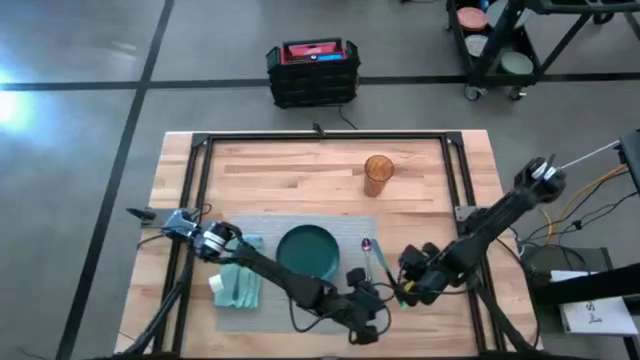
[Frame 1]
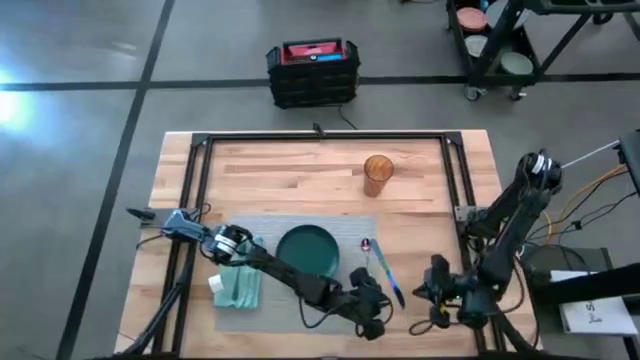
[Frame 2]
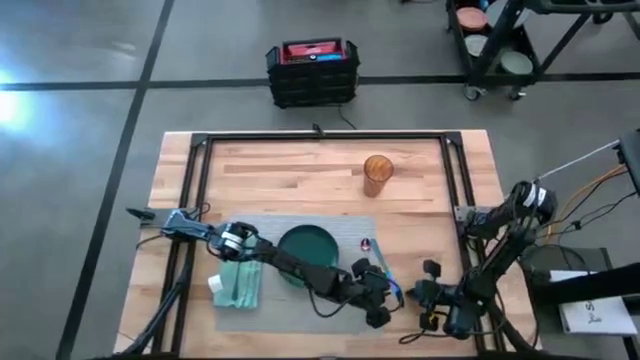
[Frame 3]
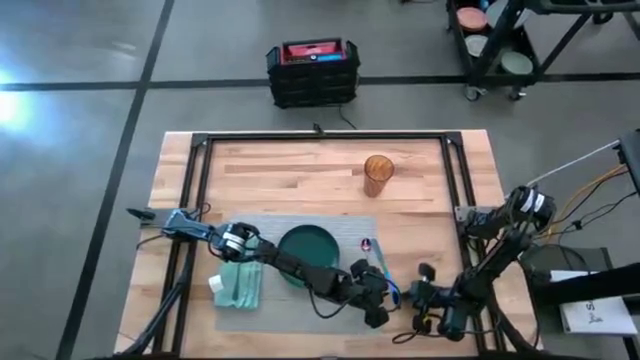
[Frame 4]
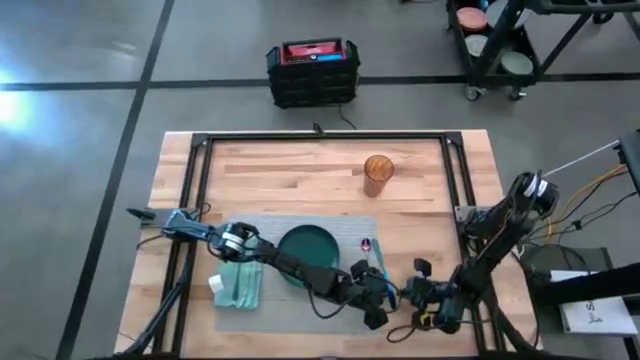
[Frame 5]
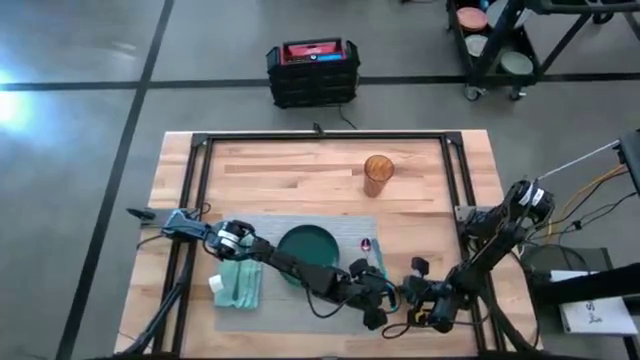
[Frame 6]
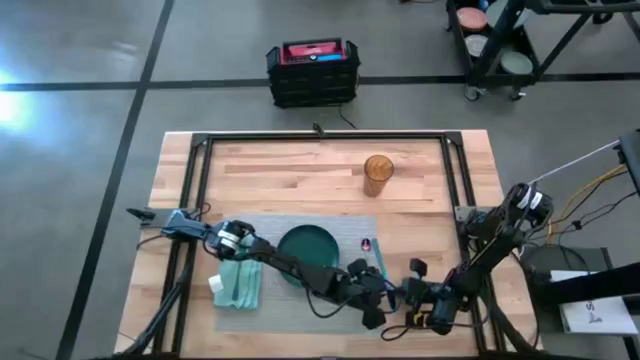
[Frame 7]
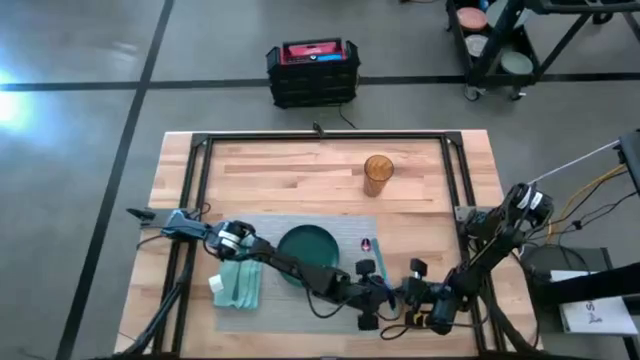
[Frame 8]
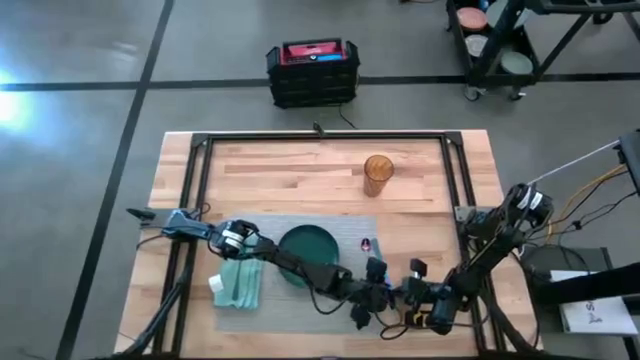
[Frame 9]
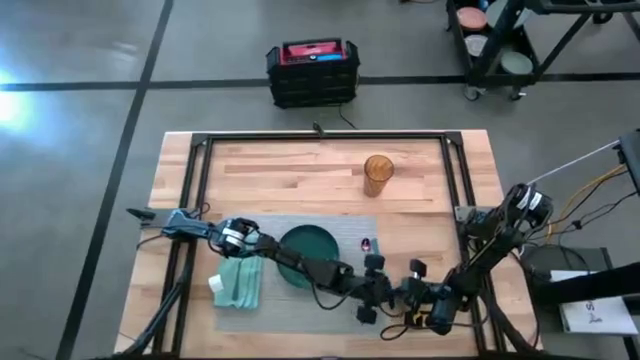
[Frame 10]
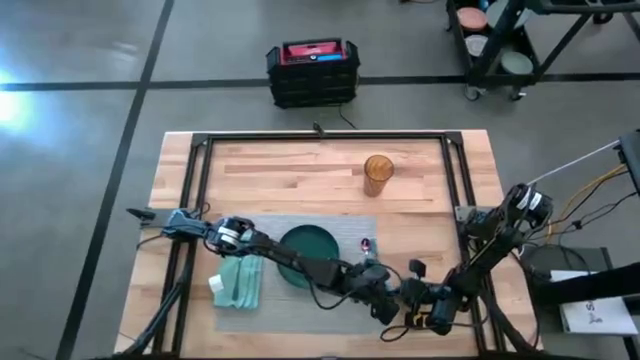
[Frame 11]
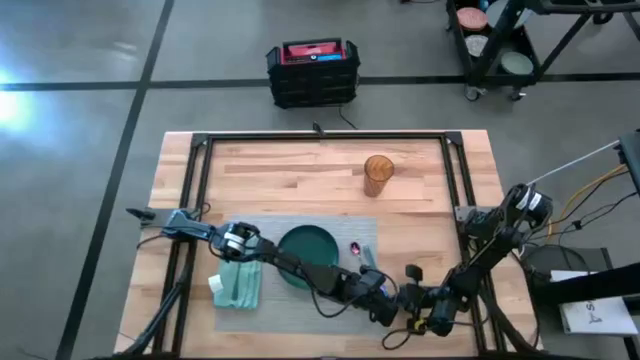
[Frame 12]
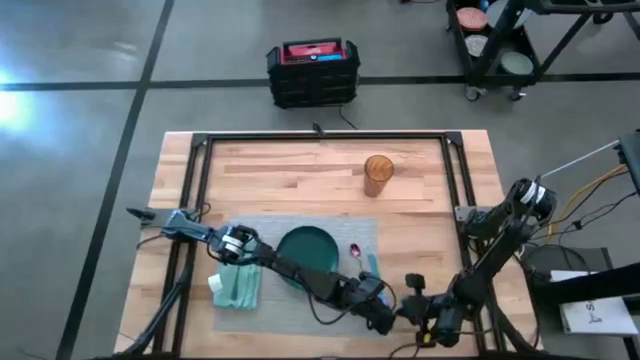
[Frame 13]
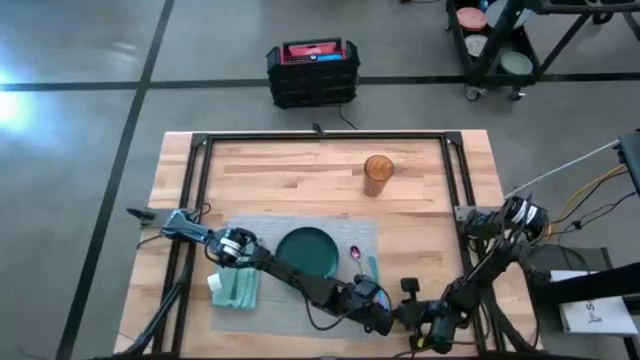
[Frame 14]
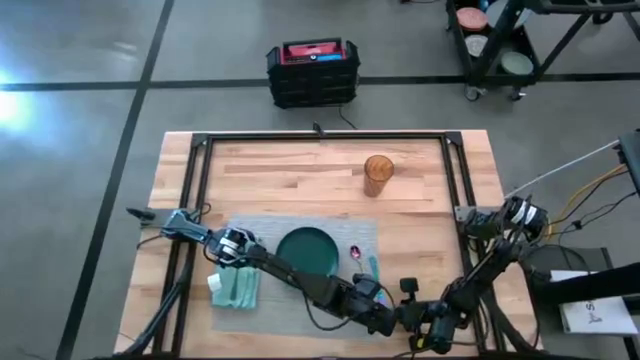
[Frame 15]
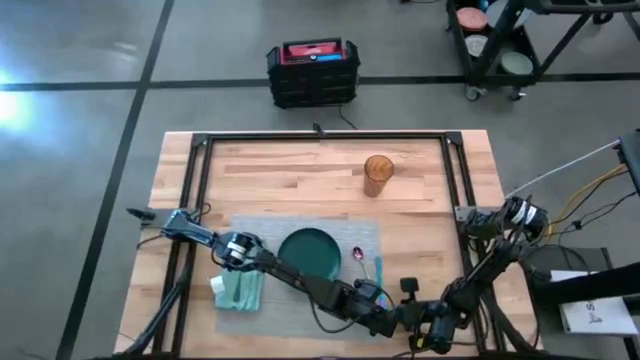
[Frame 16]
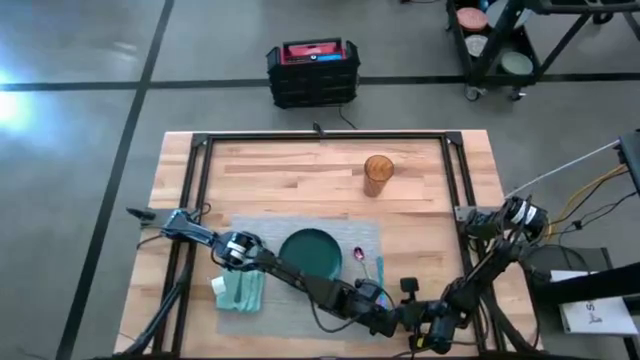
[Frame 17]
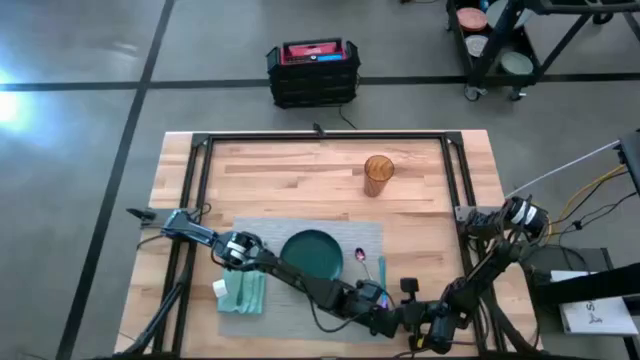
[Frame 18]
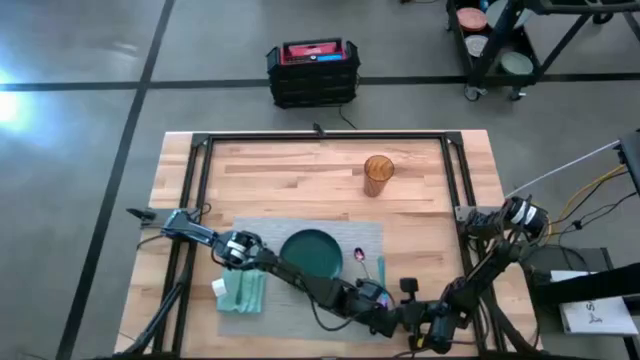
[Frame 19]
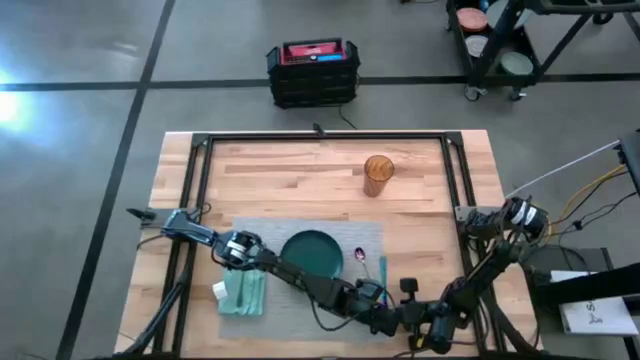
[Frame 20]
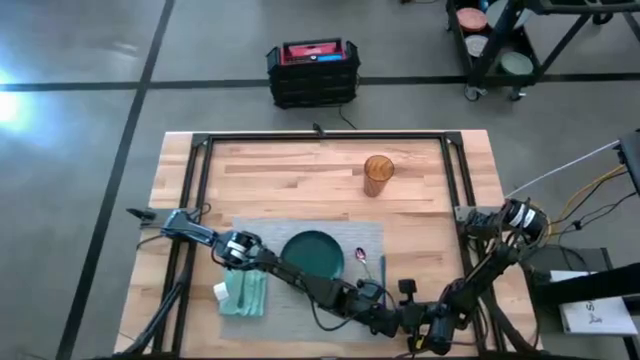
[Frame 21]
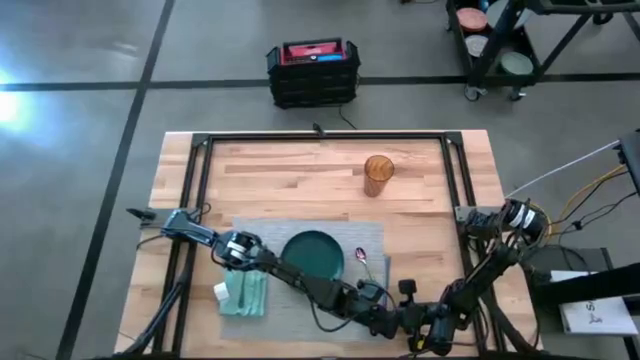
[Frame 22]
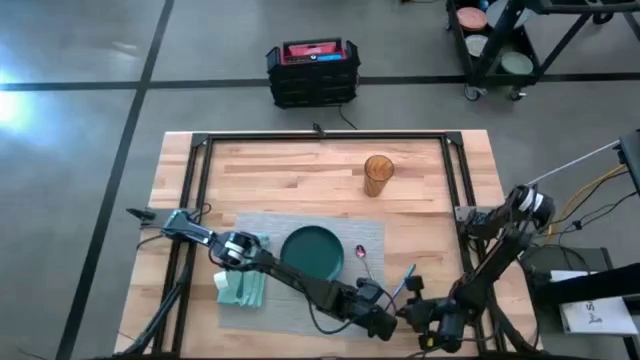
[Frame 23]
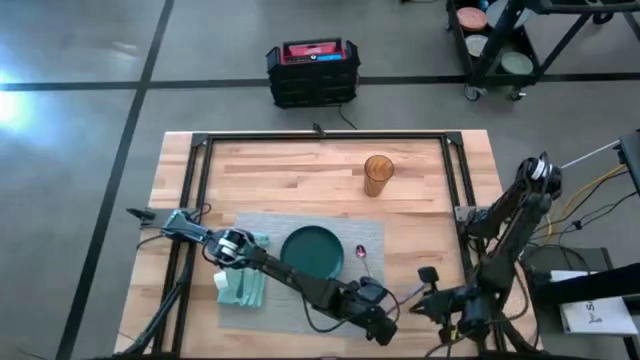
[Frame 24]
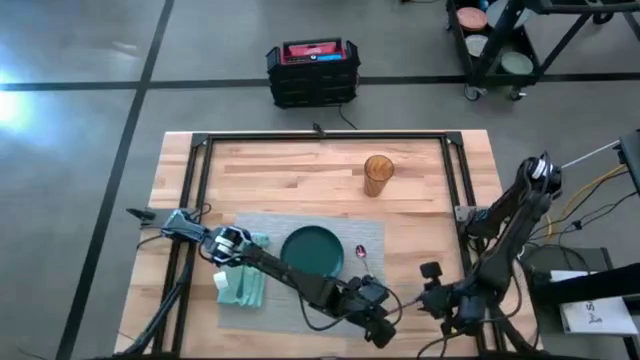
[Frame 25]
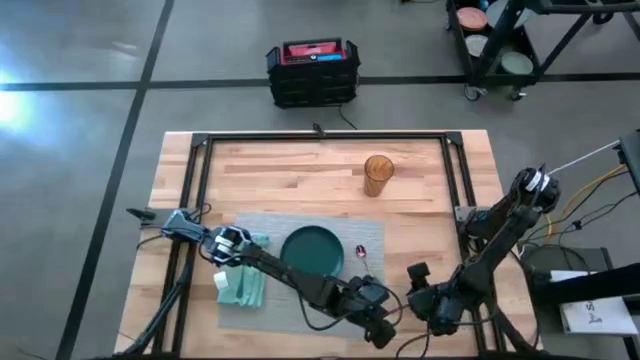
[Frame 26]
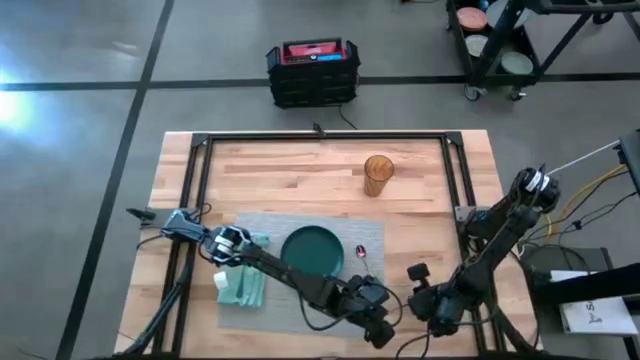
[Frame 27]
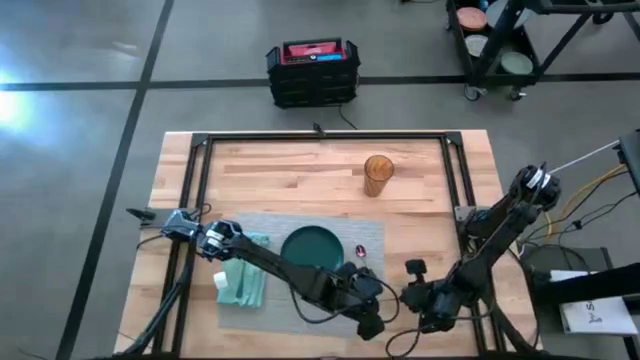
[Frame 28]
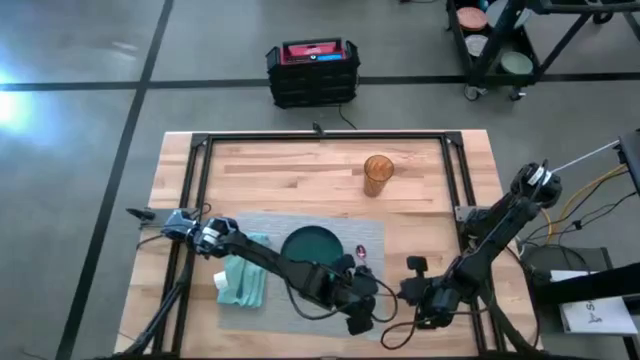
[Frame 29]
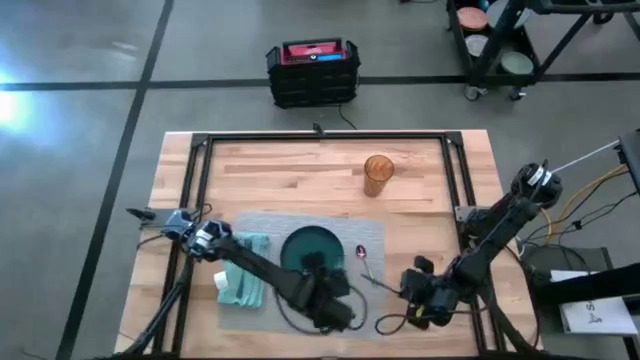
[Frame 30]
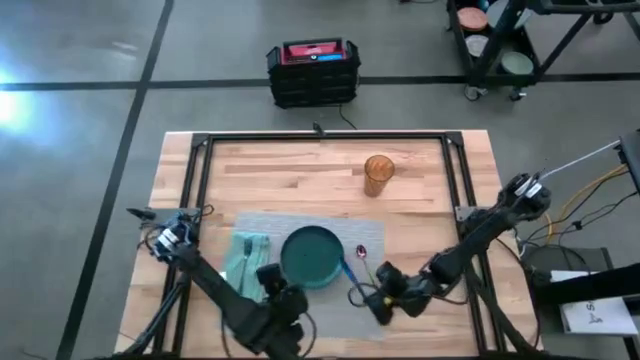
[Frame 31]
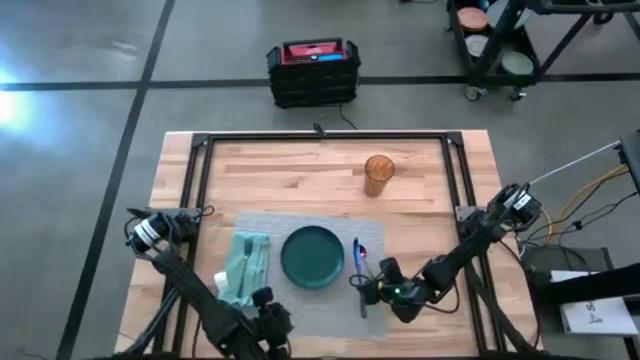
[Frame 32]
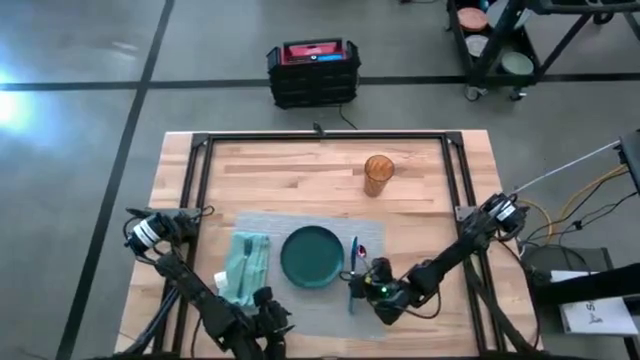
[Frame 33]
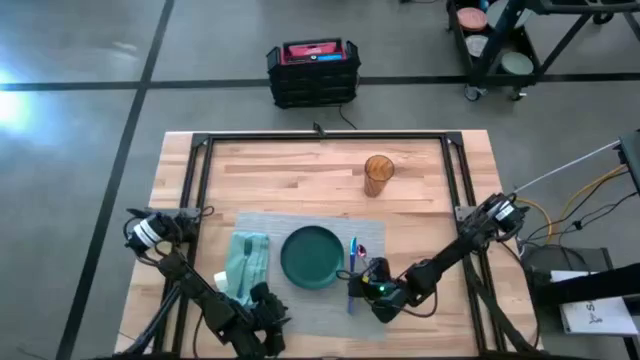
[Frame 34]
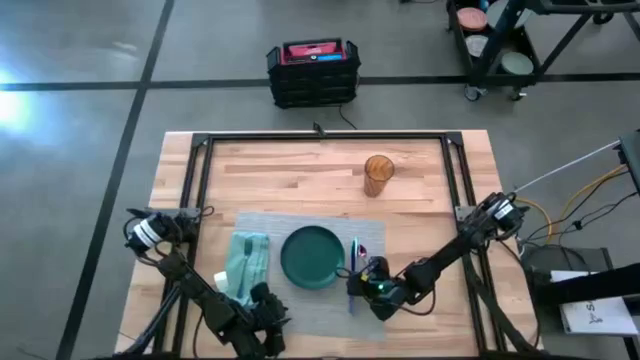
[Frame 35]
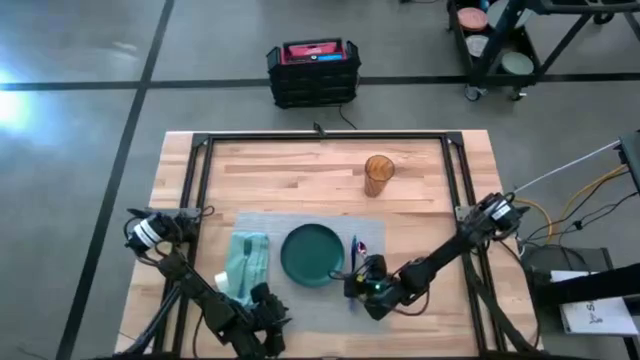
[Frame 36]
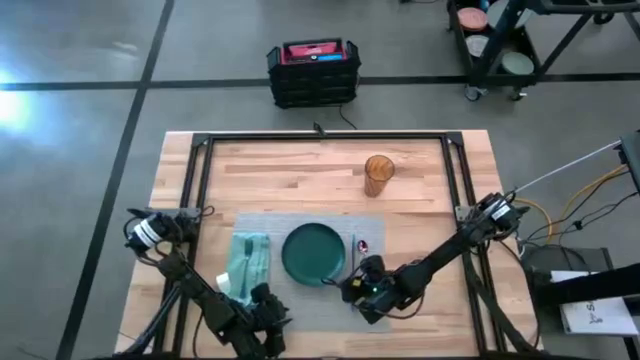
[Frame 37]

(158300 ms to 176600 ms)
Task: Set table place
Put the table knife to the right side of the dark green plate on the table mat

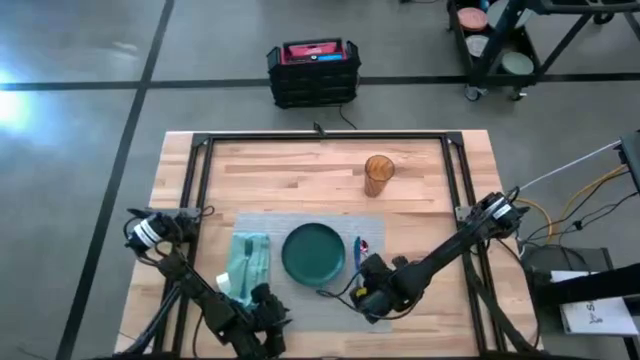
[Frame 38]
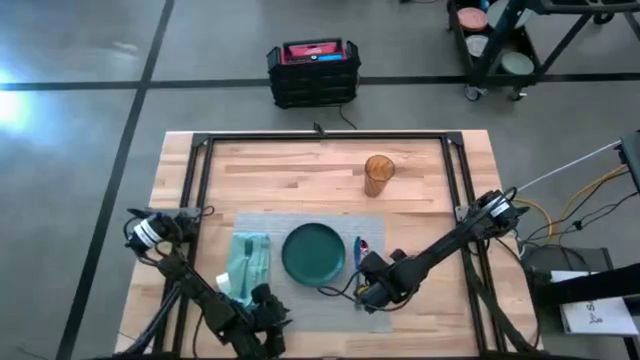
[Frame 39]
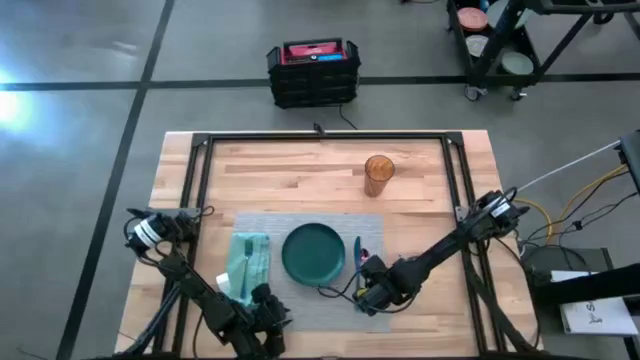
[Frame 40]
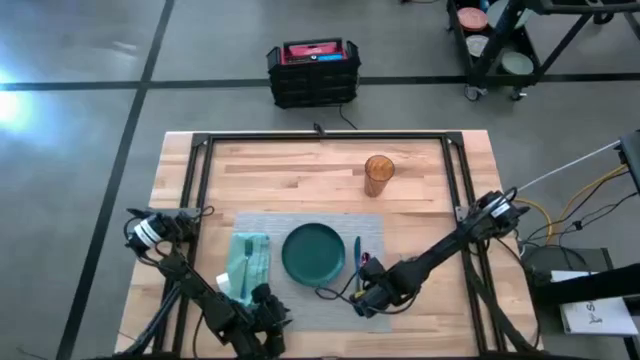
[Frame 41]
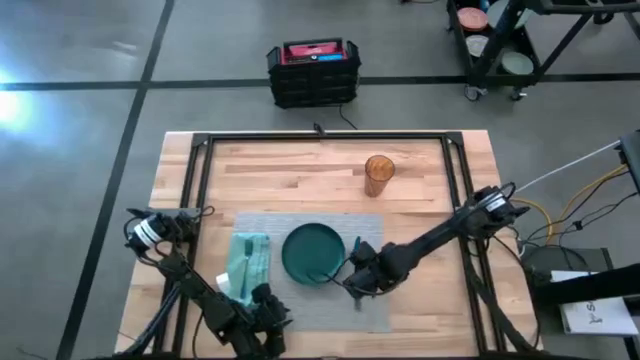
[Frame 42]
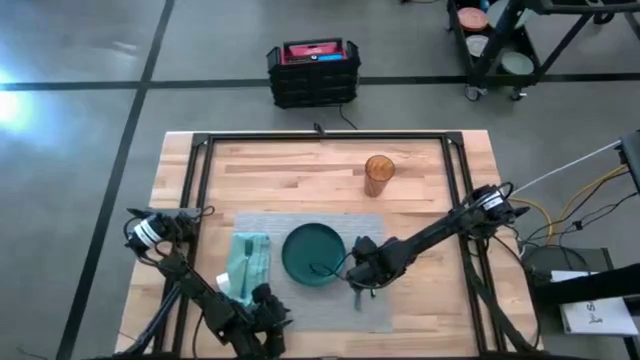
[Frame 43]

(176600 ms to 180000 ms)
Adjust the tablespoon on the table mat

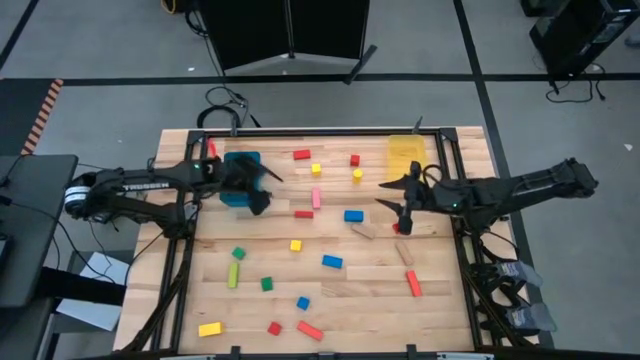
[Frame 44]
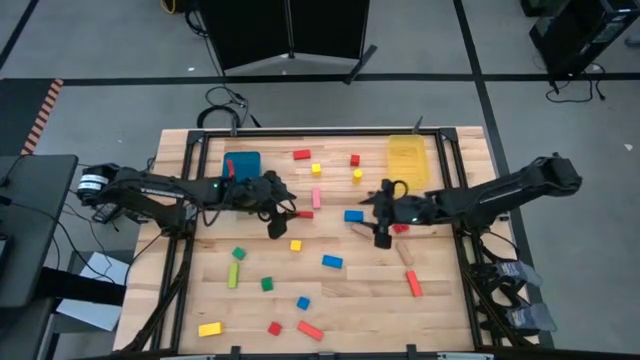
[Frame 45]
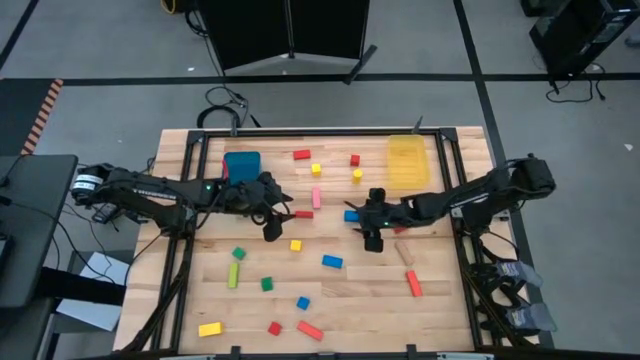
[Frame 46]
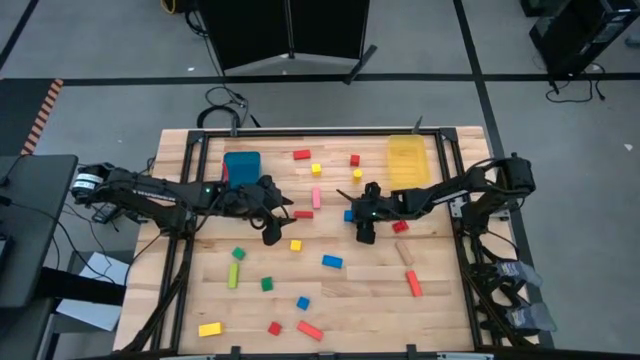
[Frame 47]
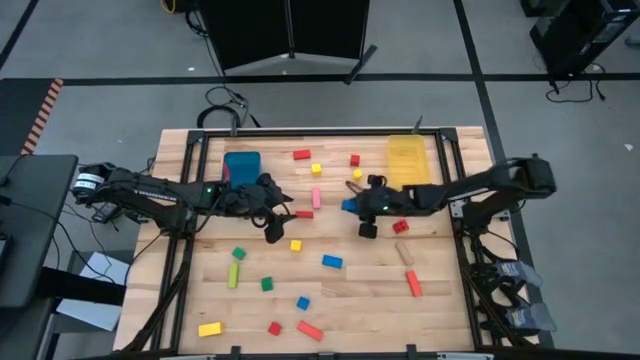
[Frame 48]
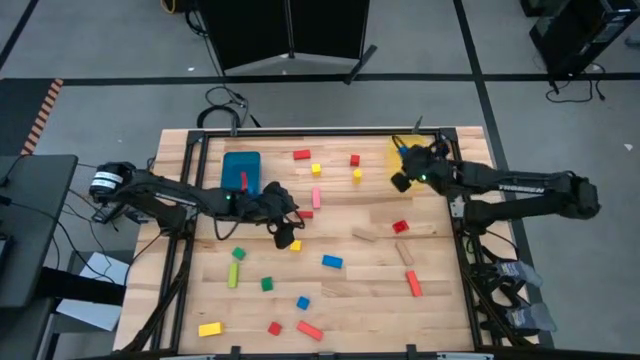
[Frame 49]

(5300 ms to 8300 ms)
Task: Sort blocks by size
Put the large blue block into the yellow bin
